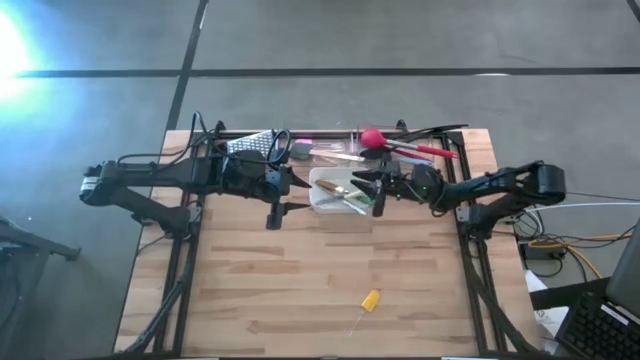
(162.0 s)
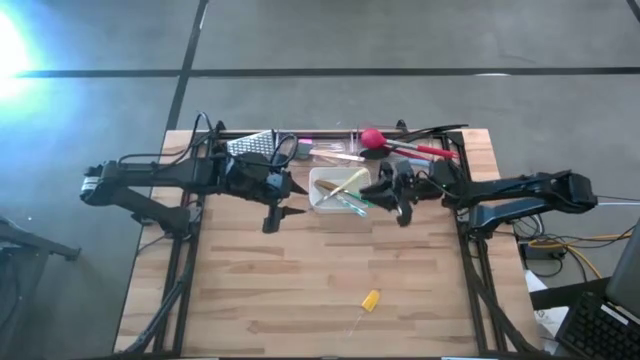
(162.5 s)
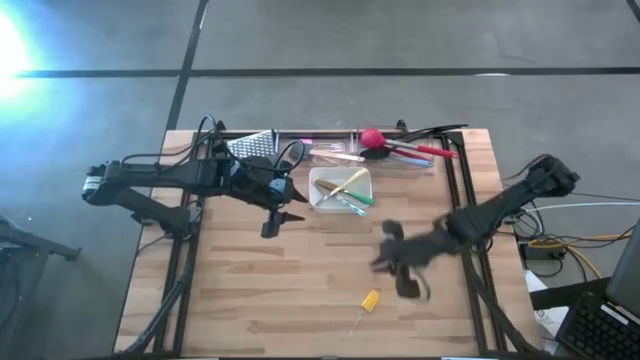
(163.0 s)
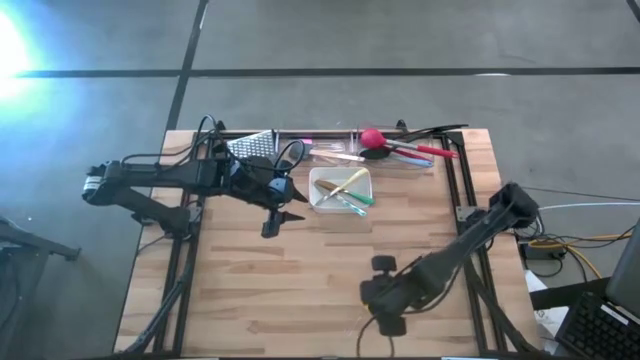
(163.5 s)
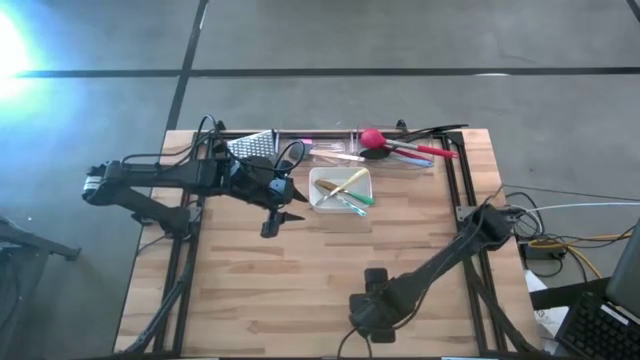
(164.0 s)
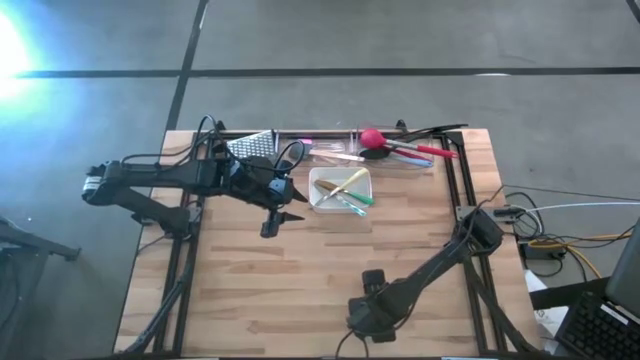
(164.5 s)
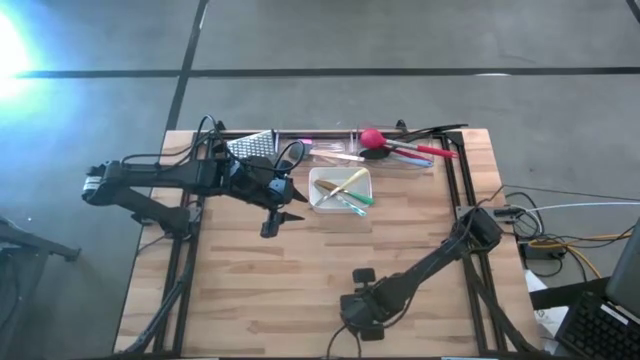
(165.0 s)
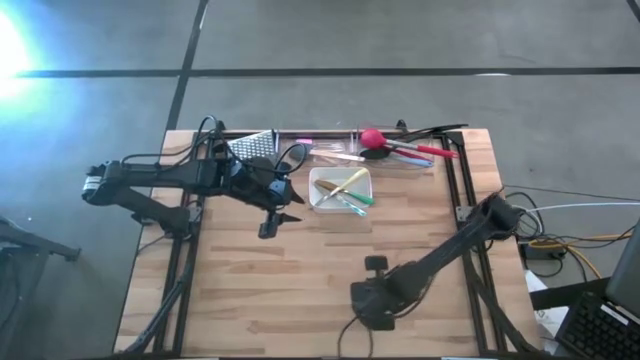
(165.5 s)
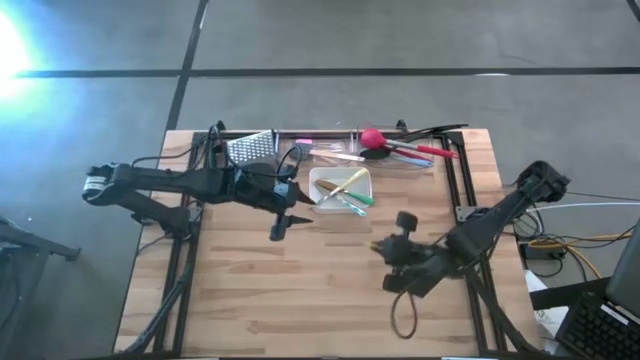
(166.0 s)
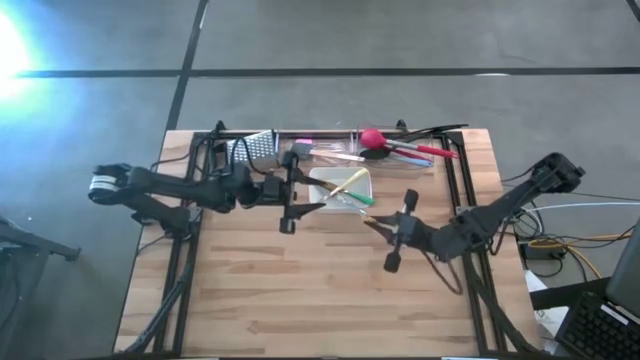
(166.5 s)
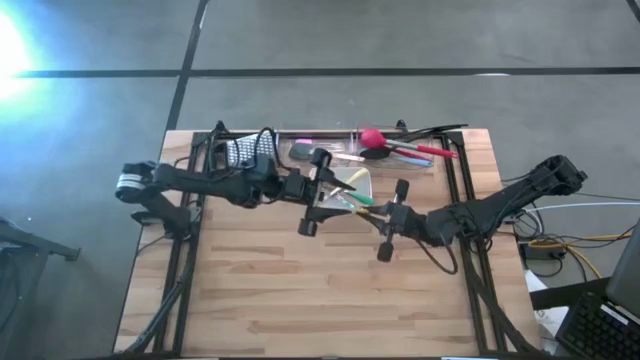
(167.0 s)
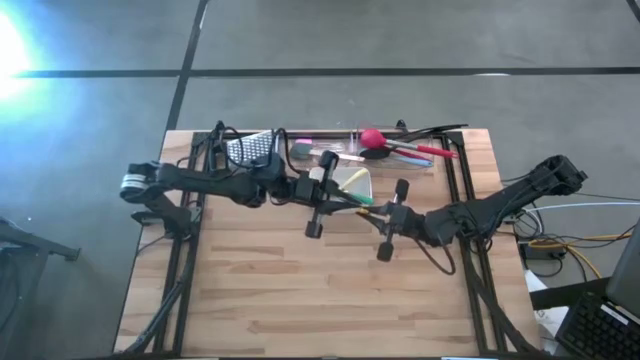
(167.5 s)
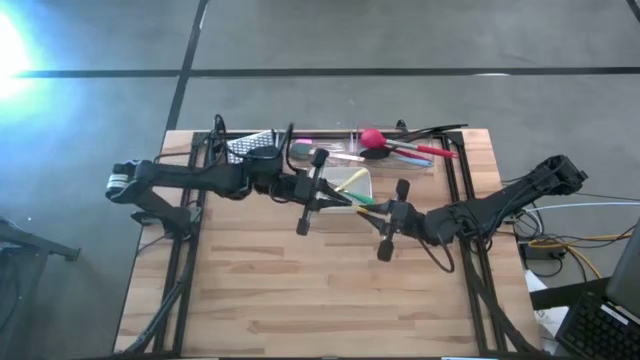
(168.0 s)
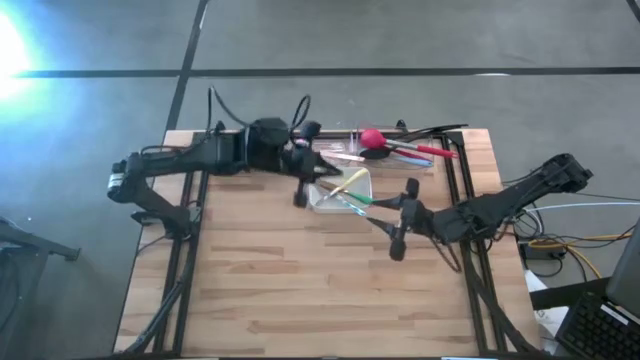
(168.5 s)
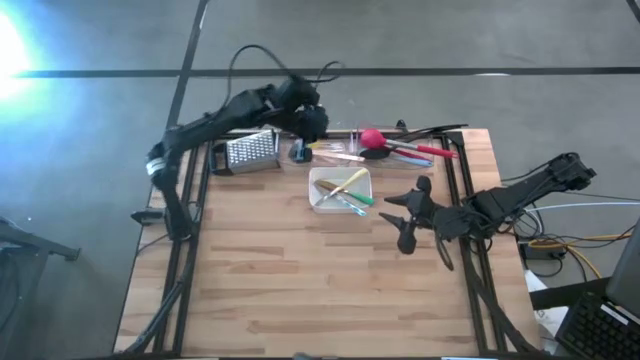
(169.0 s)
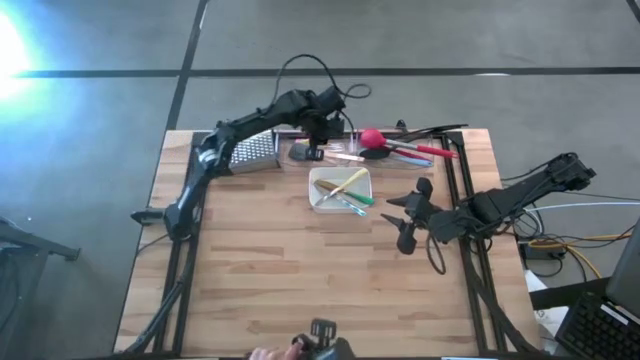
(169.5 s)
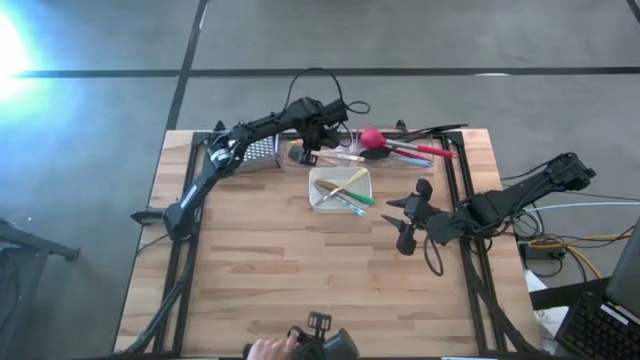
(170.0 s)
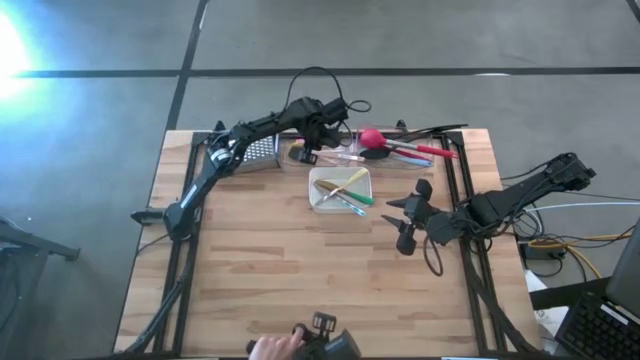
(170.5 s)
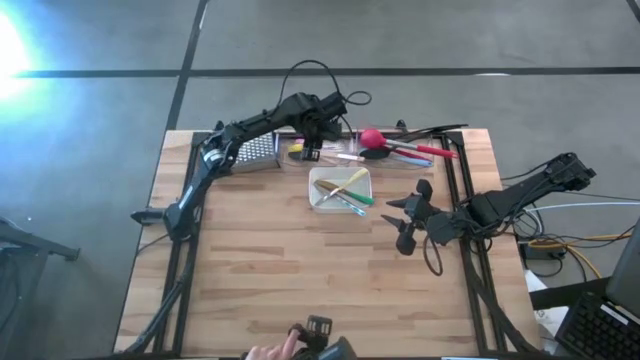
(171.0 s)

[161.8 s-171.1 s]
Task: Pick & Place Kitchen Items
Put the yellow spatula into the left transparent bin

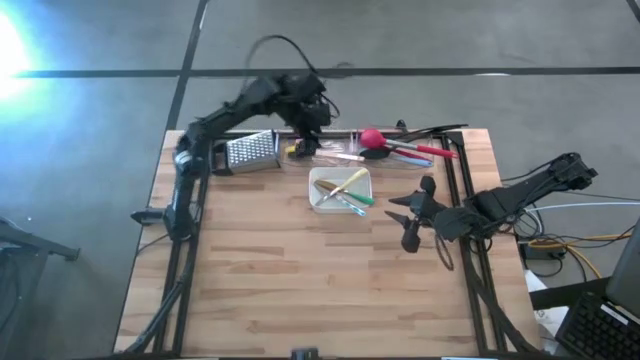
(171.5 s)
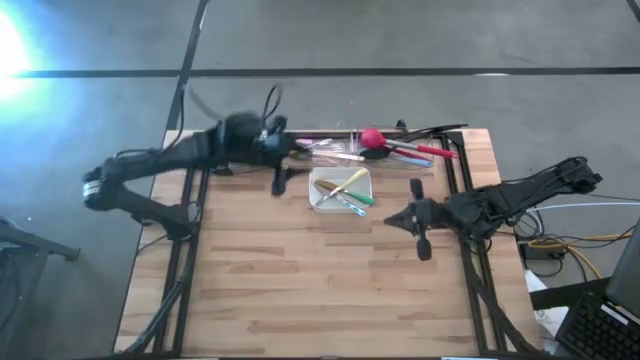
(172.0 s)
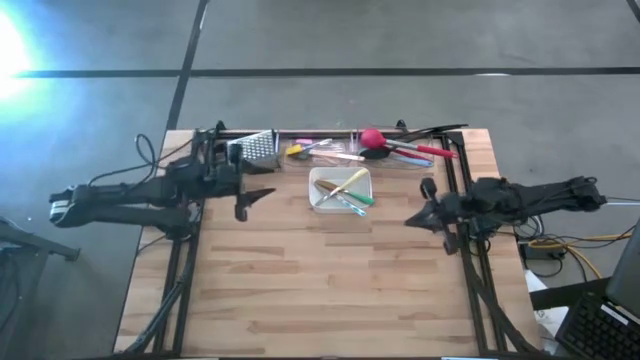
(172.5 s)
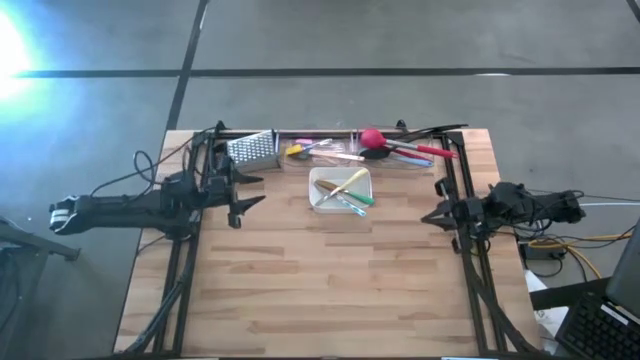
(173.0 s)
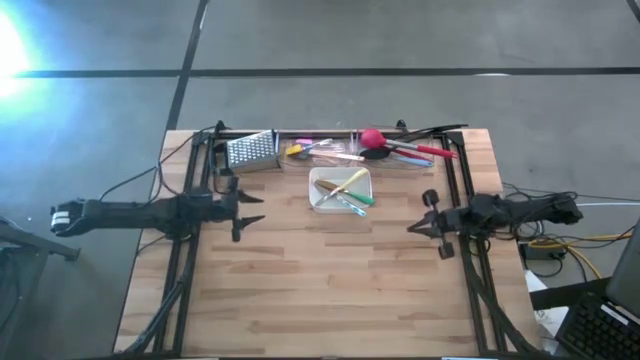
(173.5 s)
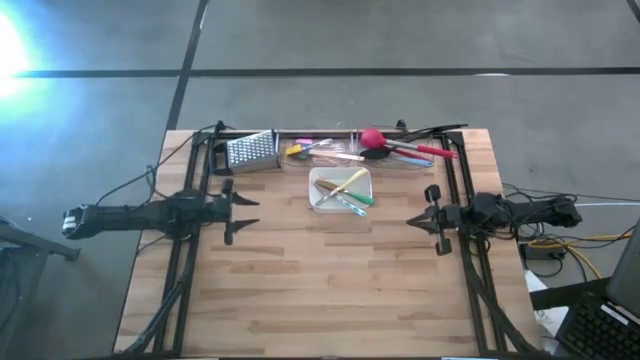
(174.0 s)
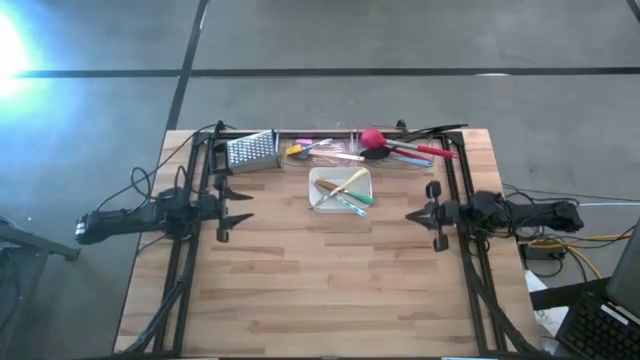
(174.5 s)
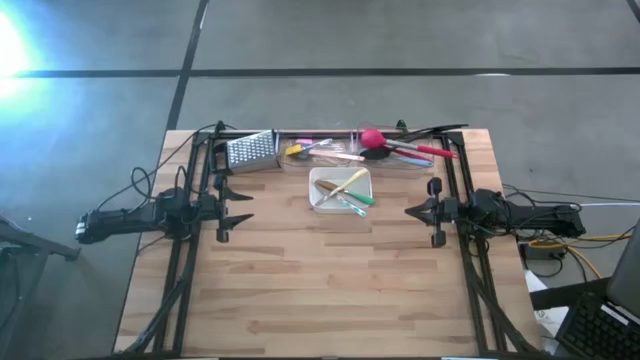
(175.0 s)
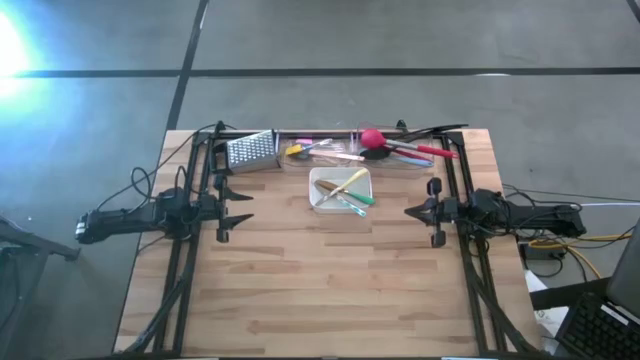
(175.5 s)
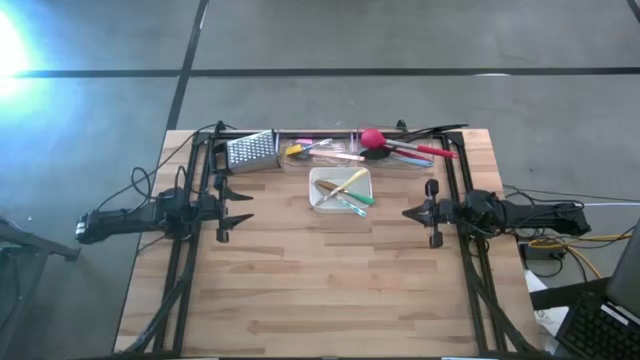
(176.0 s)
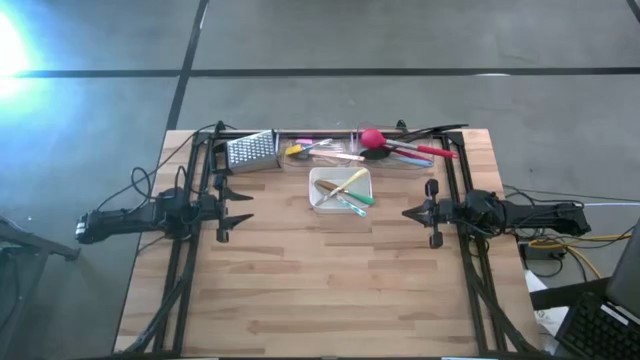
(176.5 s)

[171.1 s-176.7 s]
Return to Home Position

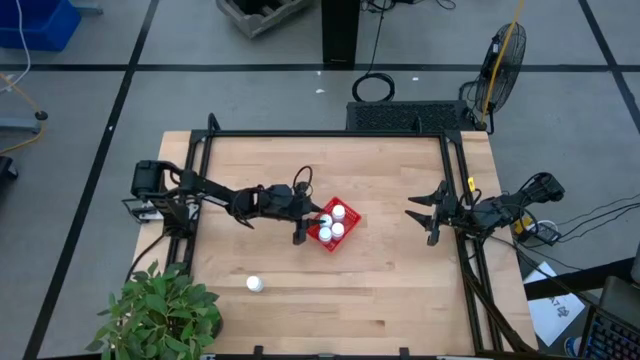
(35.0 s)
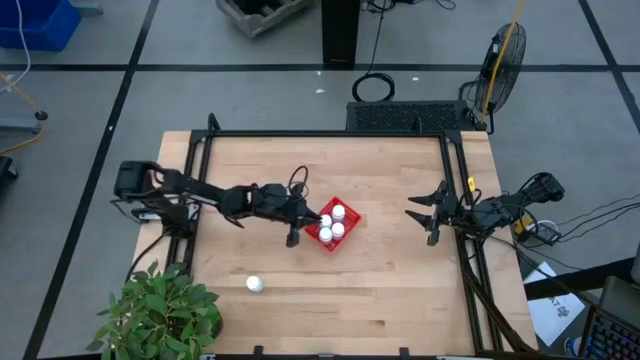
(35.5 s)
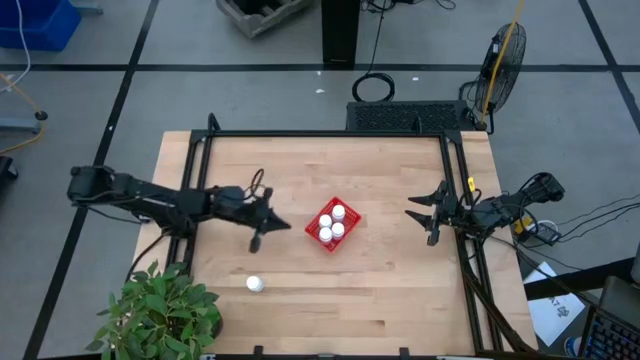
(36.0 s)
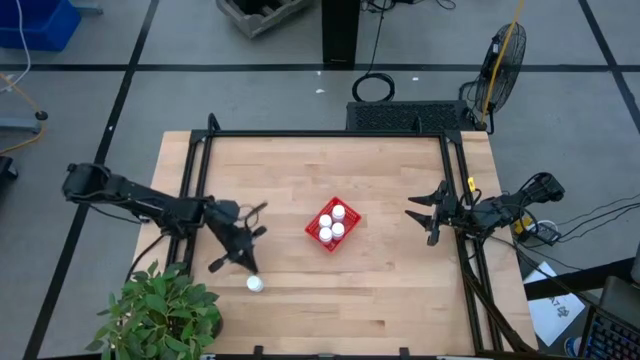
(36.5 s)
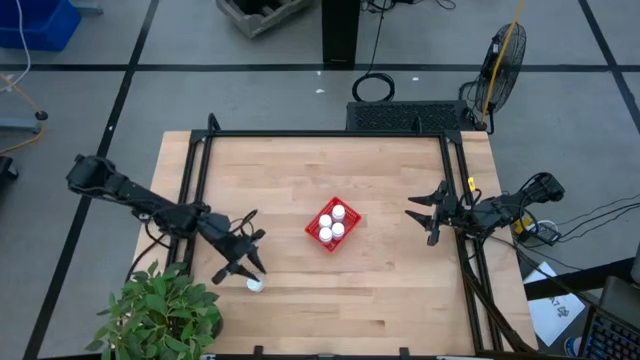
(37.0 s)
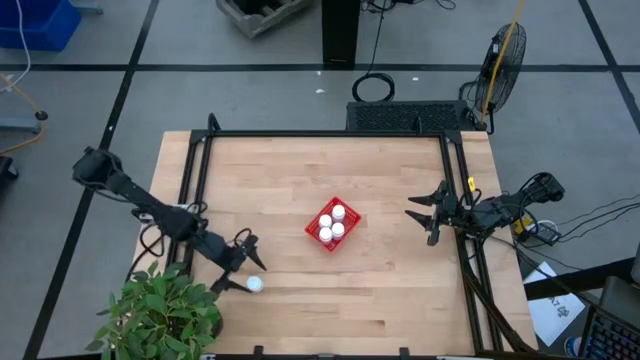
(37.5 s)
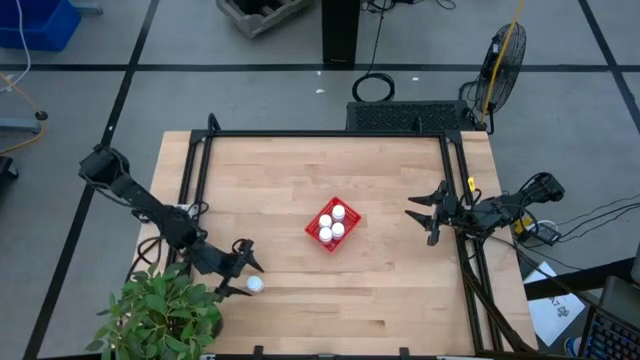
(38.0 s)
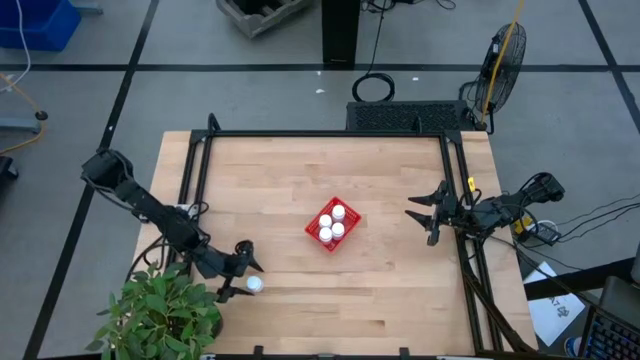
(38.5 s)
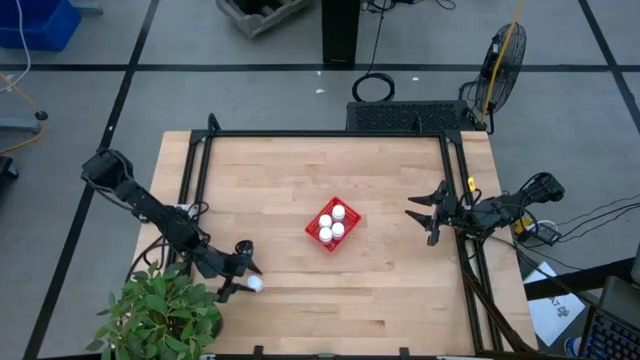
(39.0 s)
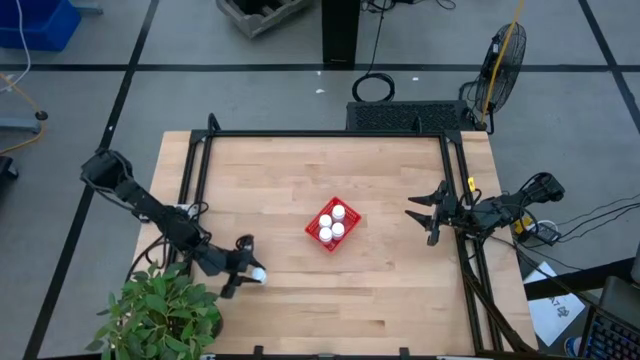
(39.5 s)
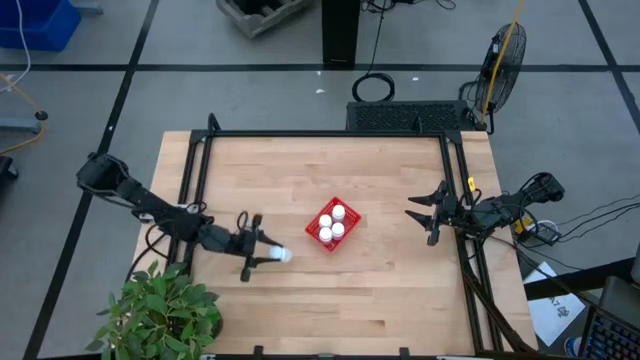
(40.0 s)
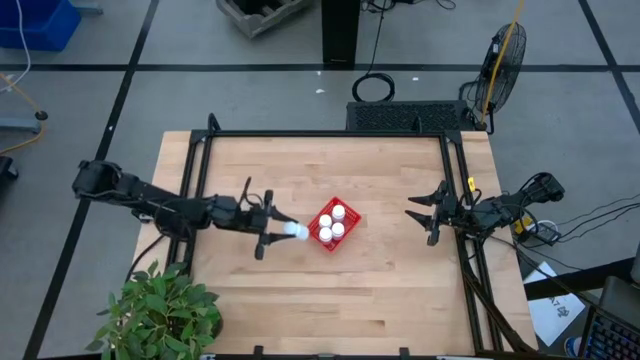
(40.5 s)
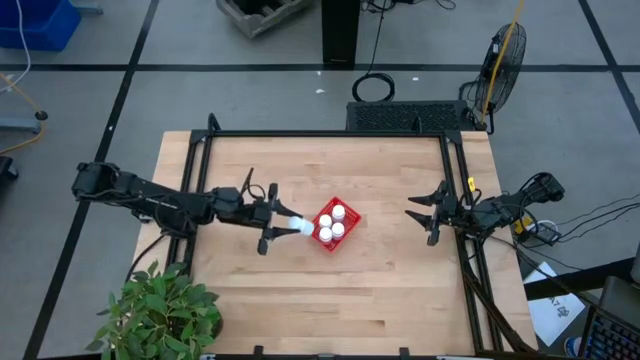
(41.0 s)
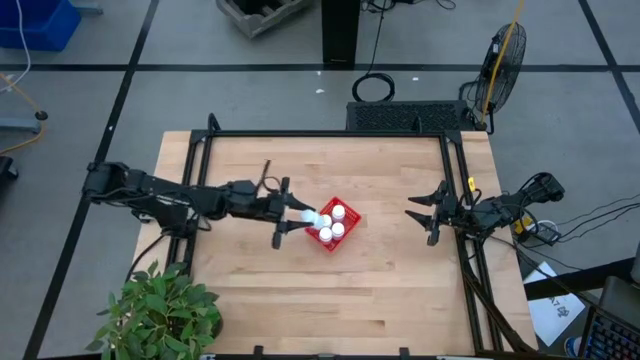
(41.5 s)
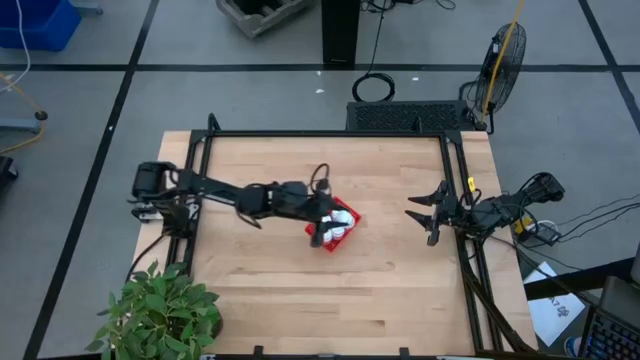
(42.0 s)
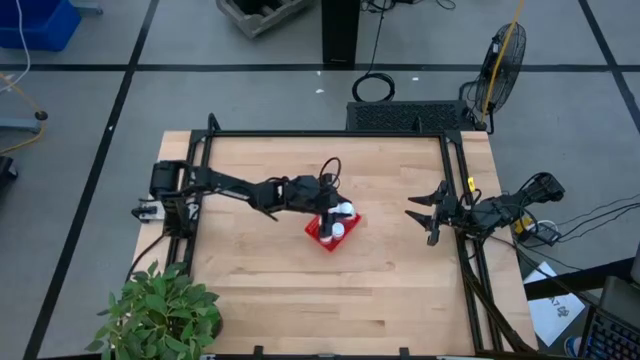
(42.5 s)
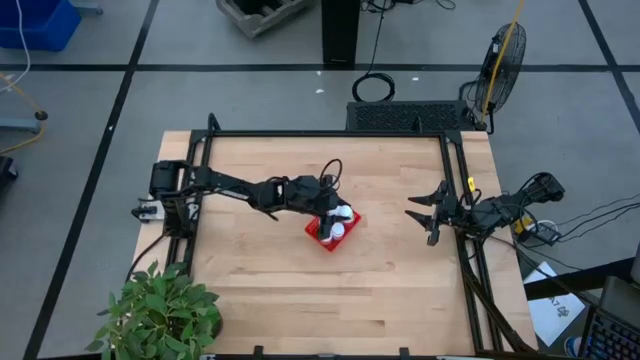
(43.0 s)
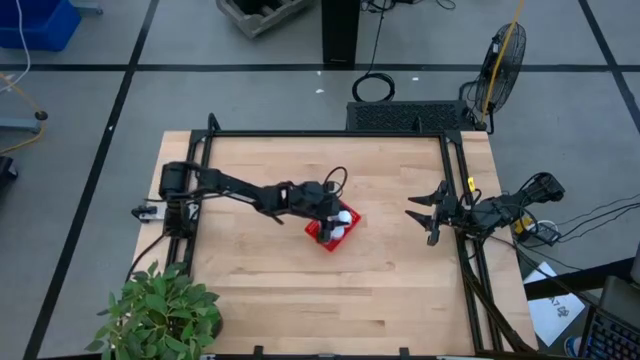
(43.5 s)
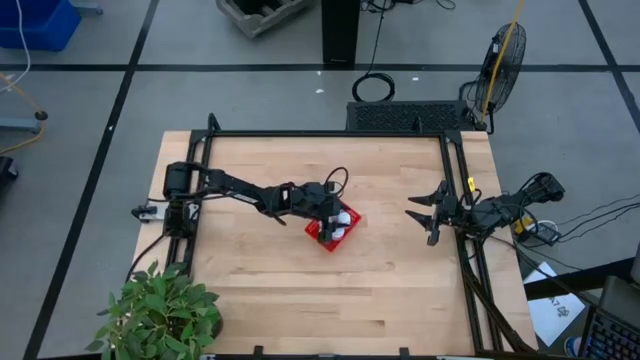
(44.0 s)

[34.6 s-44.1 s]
Task: Pick and place pill bottles into a basket
Put the white medicine bottle into the red bin
